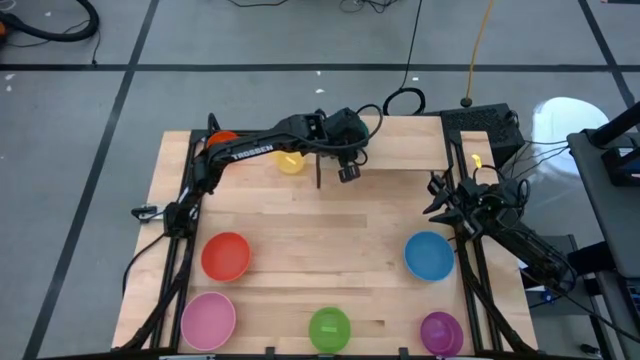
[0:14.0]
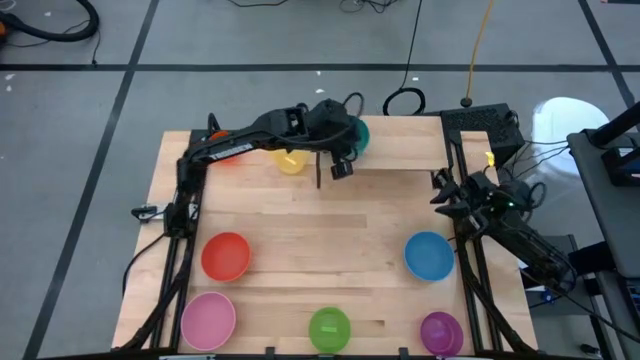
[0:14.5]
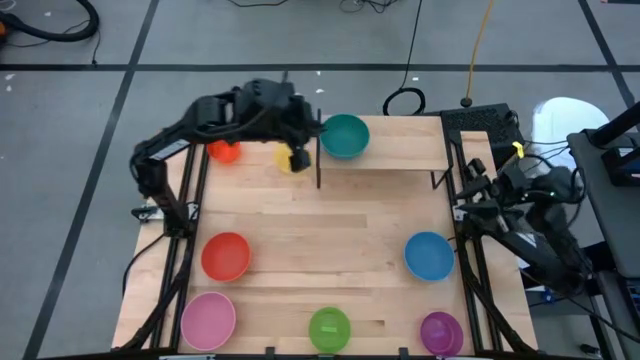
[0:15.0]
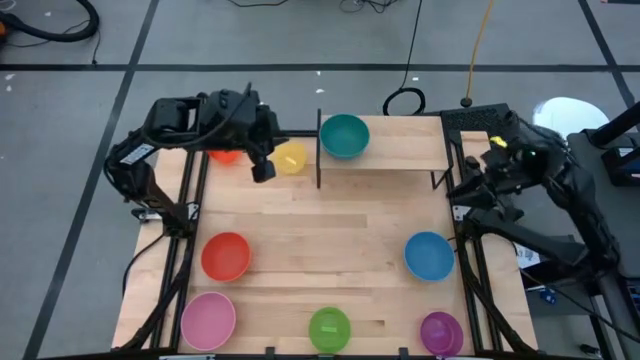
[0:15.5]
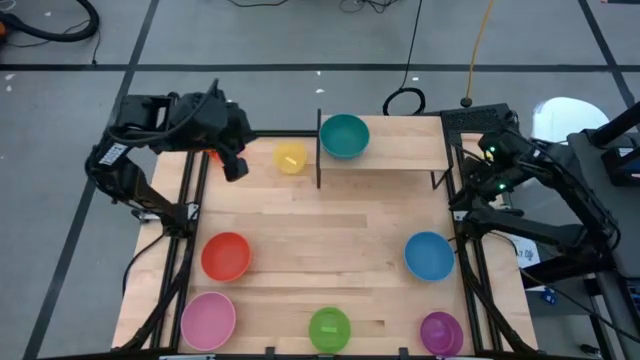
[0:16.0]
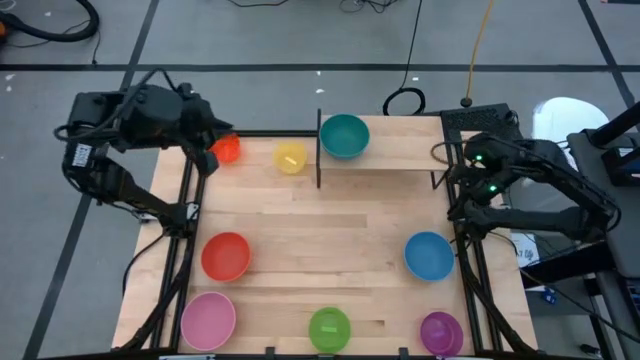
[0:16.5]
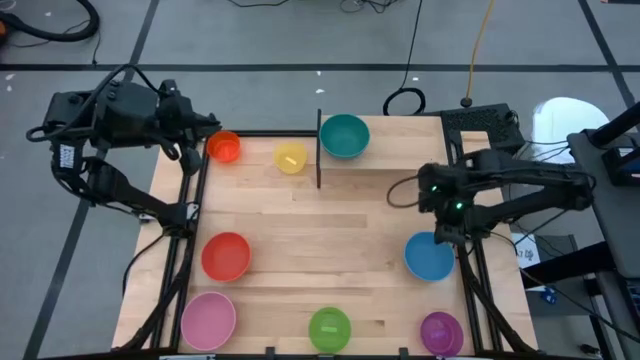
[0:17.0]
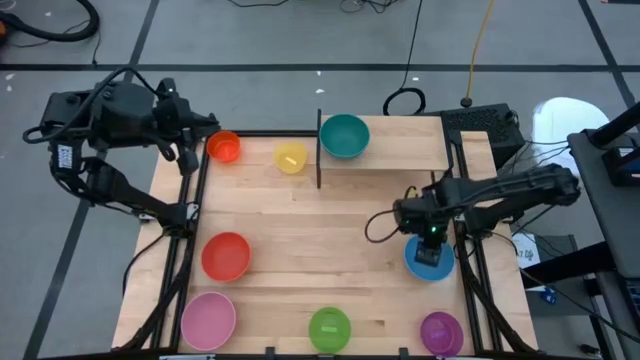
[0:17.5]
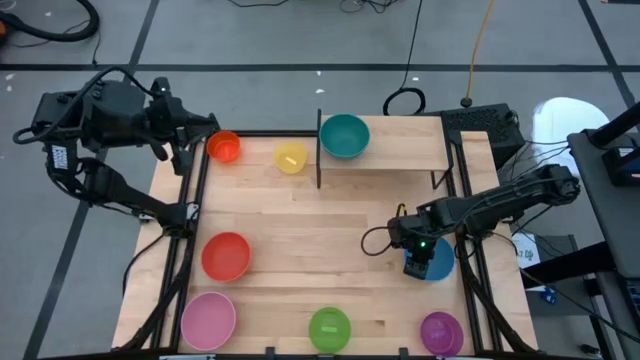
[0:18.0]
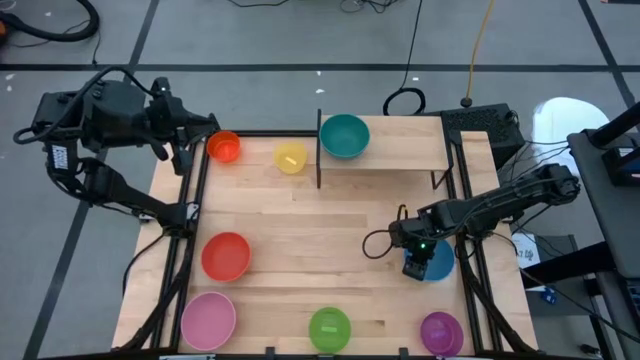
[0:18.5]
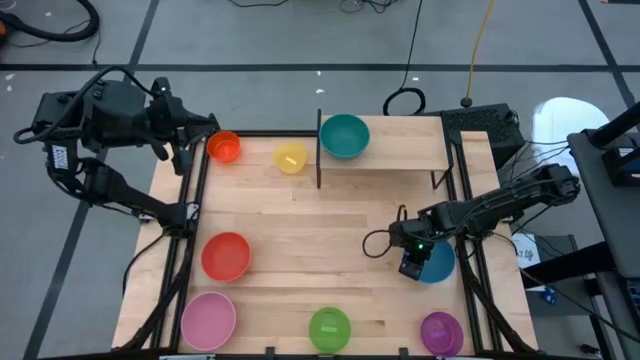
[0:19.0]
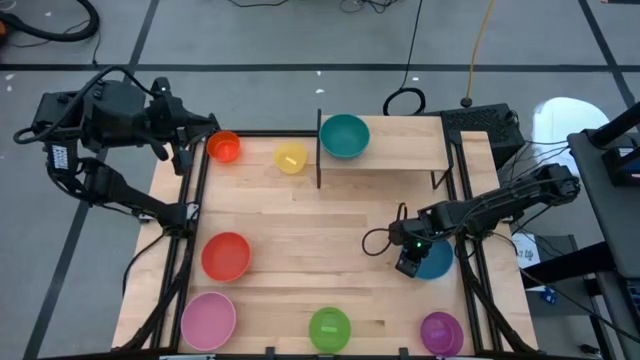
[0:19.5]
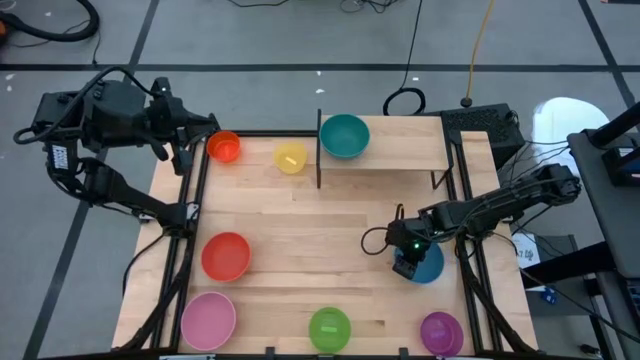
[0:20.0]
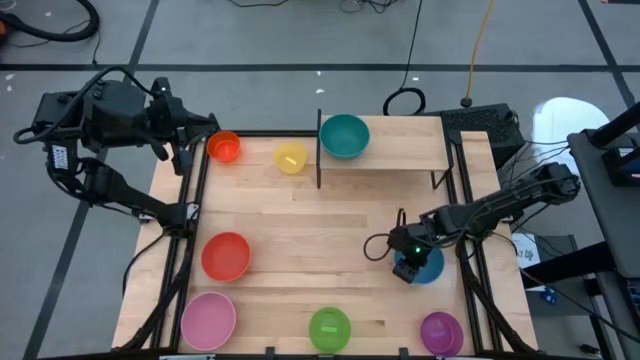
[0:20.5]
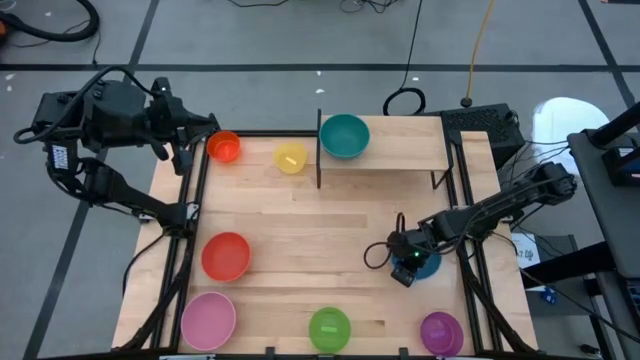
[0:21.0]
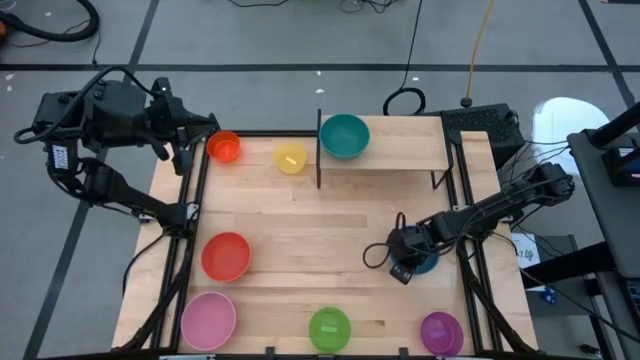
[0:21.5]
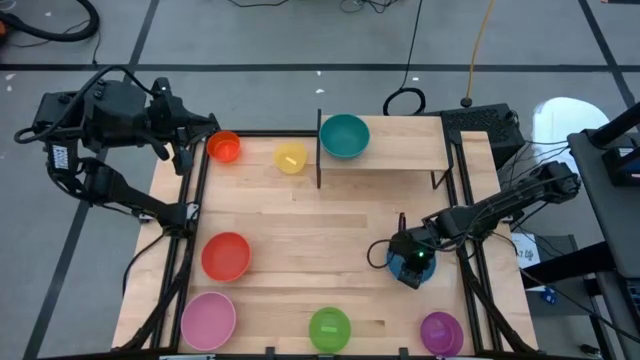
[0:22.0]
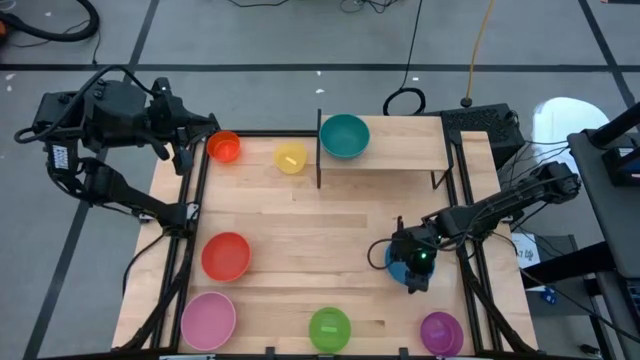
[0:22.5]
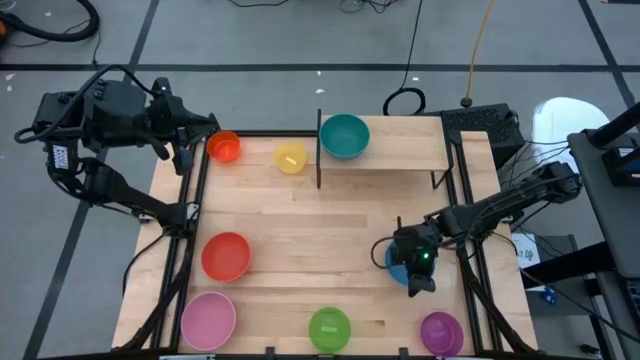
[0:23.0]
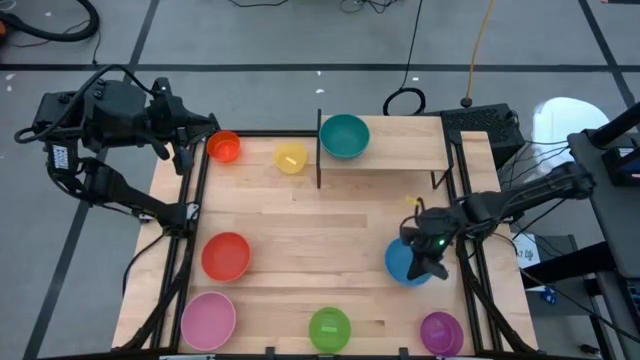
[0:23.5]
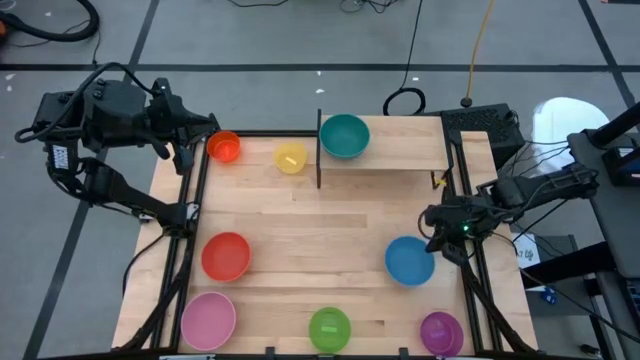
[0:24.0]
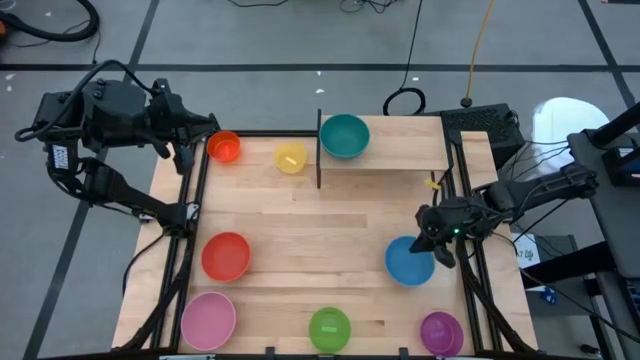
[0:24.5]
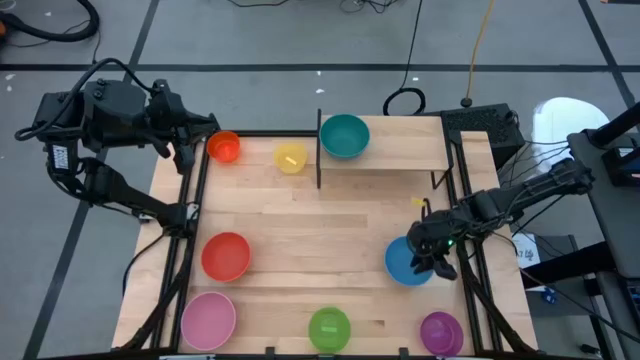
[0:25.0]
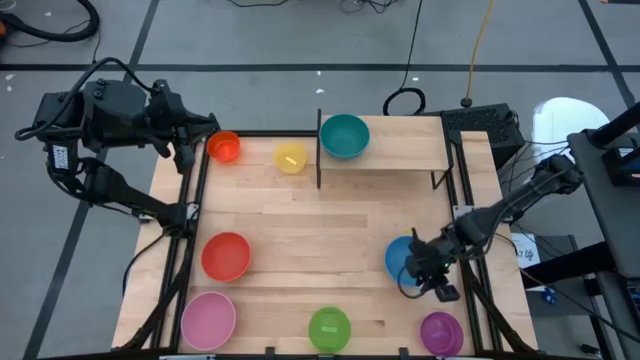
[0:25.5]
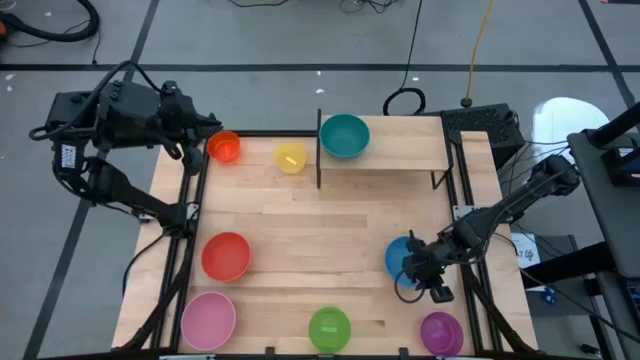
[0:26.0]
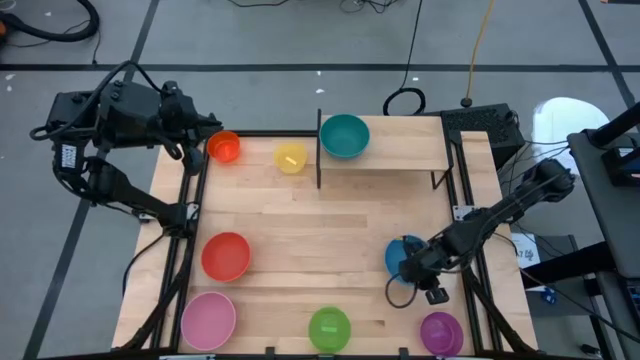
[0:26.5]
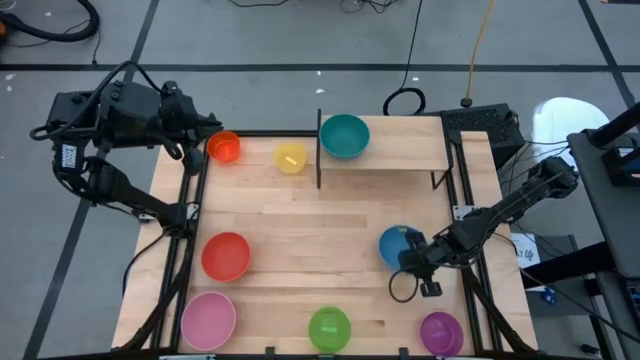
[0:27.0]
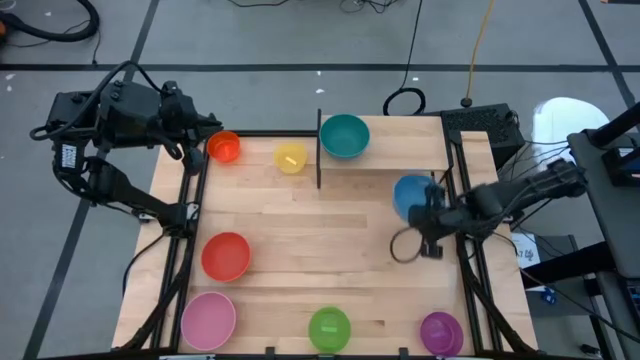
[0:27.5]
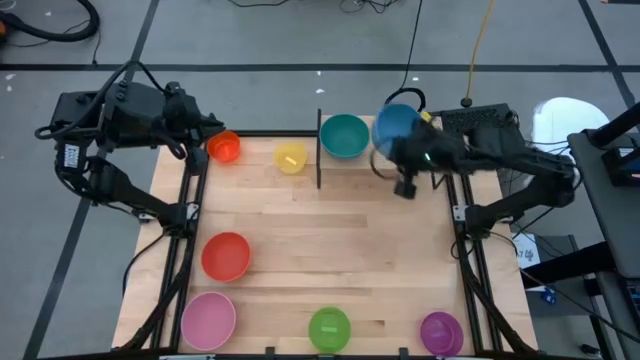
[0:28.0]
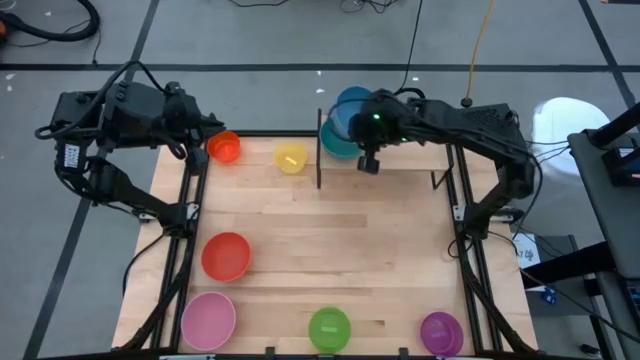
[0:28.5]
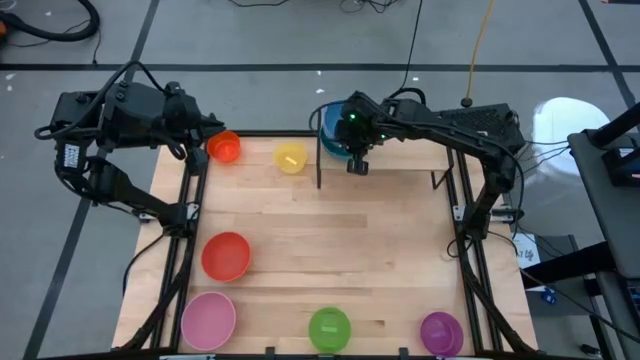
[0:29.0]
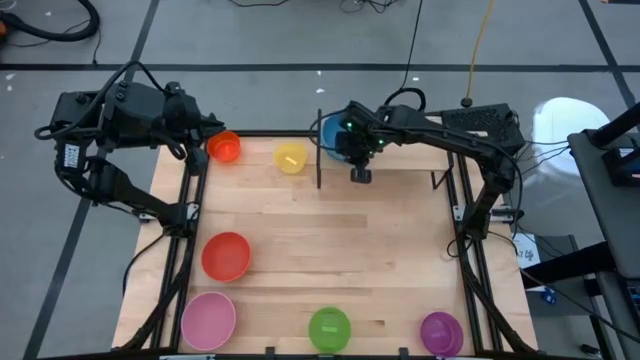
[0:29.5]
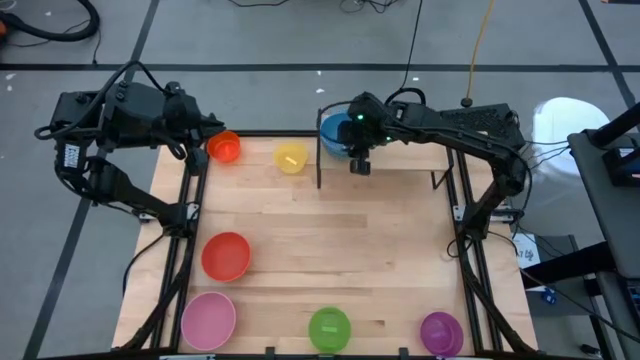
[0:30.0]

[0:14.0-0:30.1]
Task: Place and stack bowls onto a shelf
Stack the blue bowl on top of the dark green bowl on the shelf

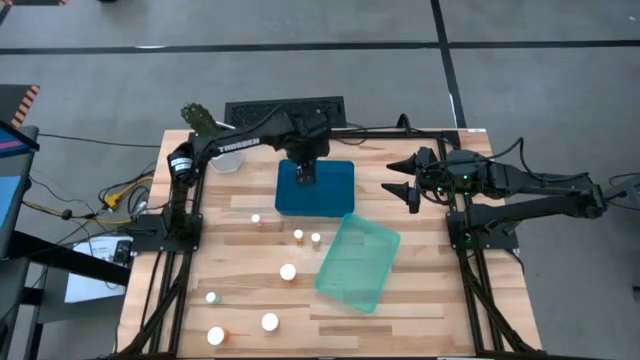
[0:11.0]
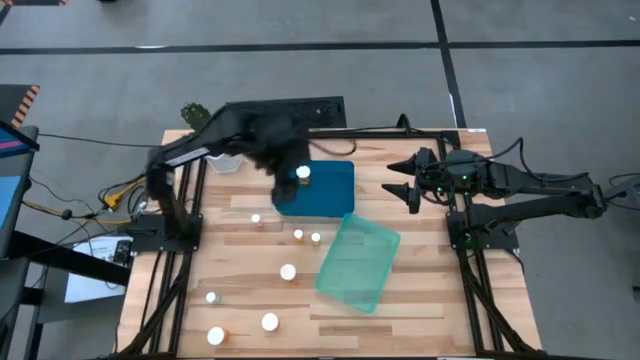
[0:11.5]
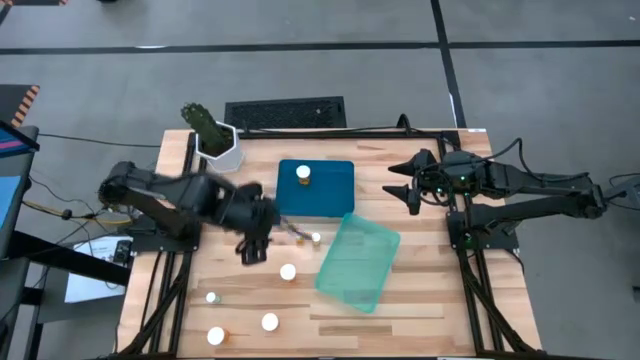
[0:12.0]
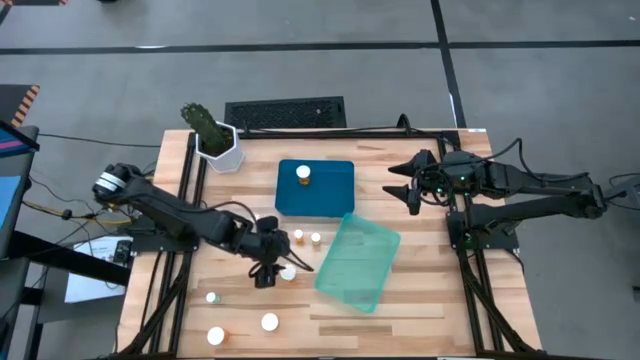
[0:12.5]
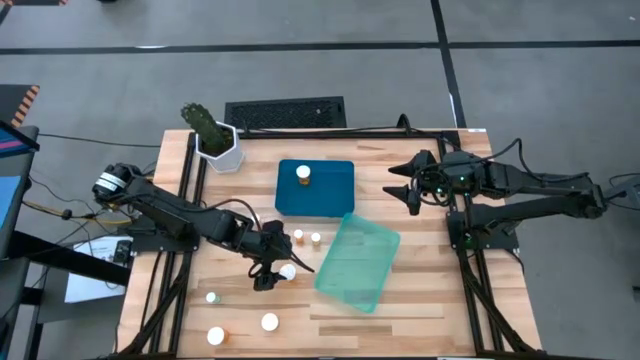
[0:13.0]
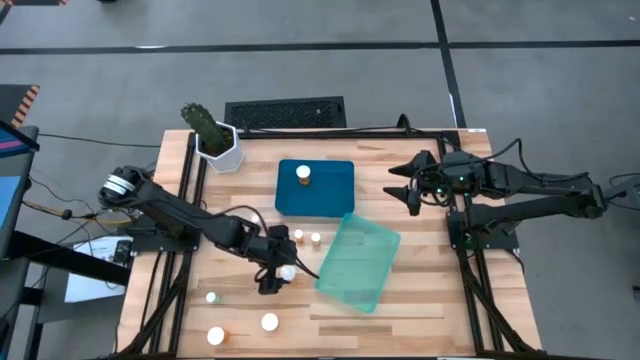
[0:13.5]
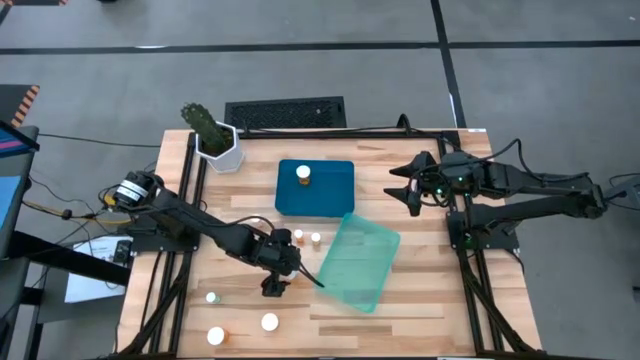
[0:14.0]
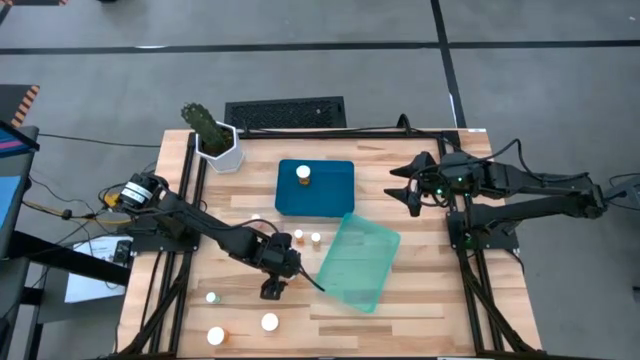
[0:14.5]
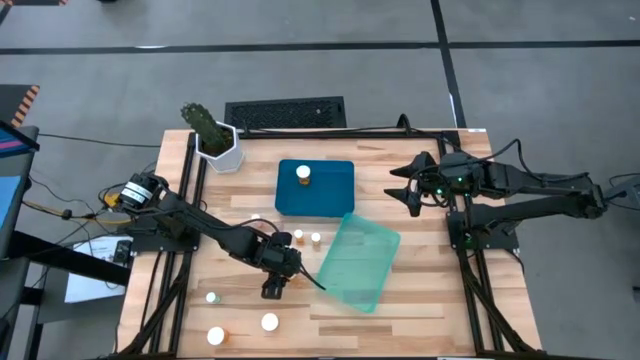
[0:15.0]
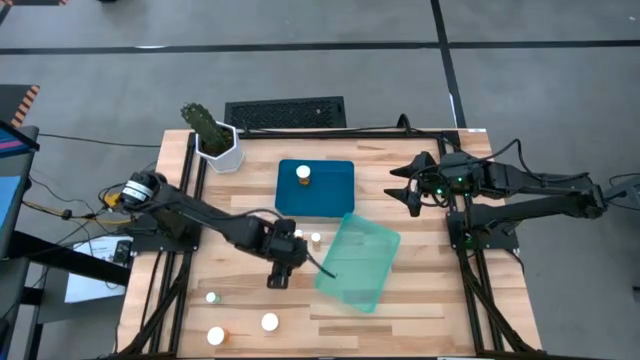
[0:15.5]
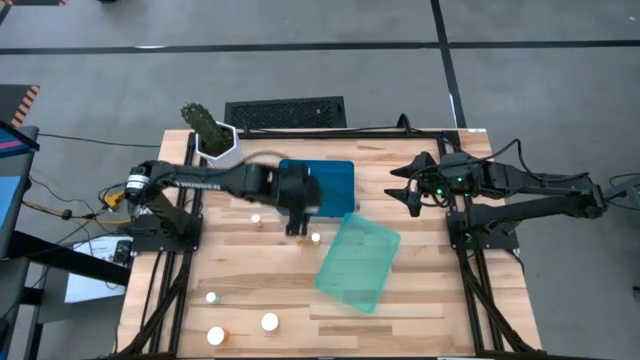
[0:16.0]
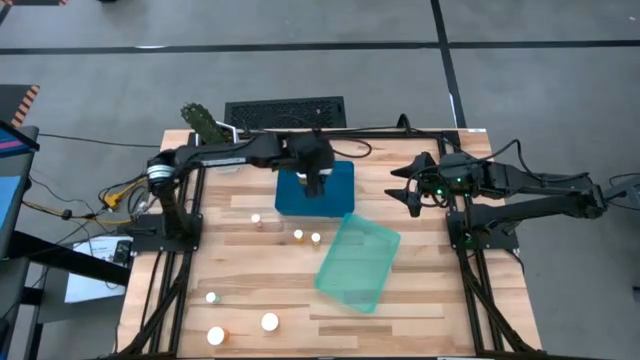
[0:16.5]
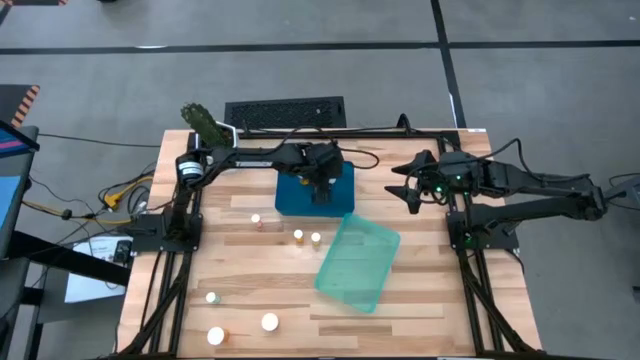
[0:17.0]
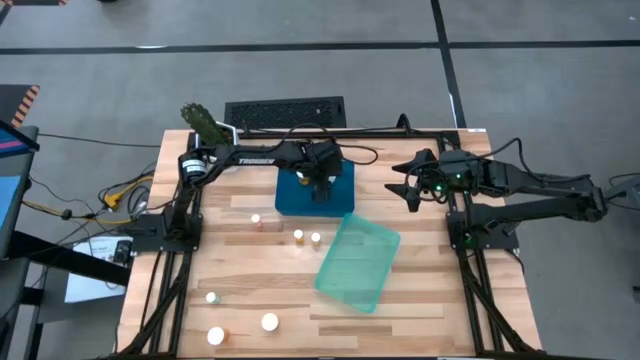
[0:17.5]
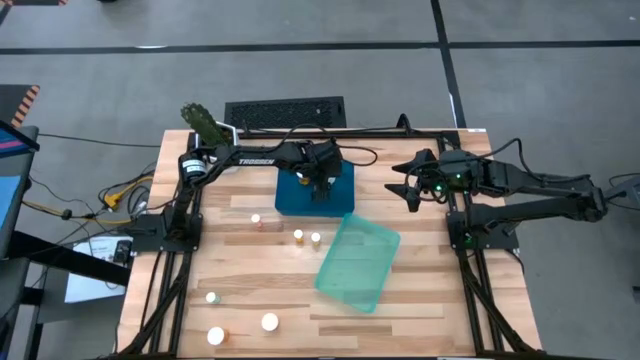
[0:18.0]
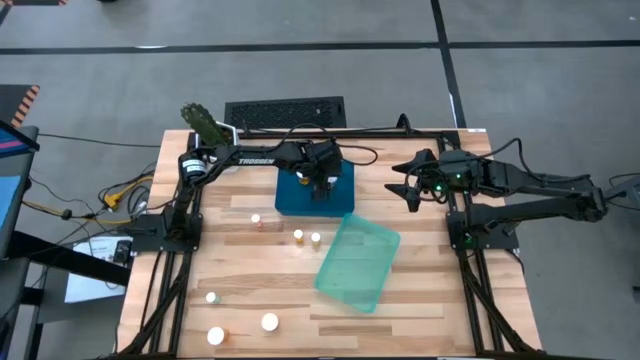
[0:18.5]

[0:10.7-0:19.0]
Task: Pick and place medicine bottles into bin by pill shape (circle, oval)
Put the large orange pill bottle into the blue bin
